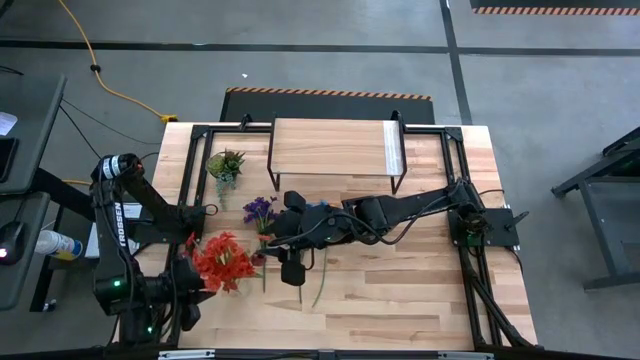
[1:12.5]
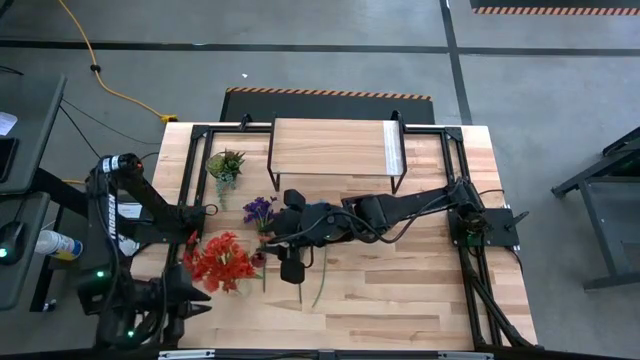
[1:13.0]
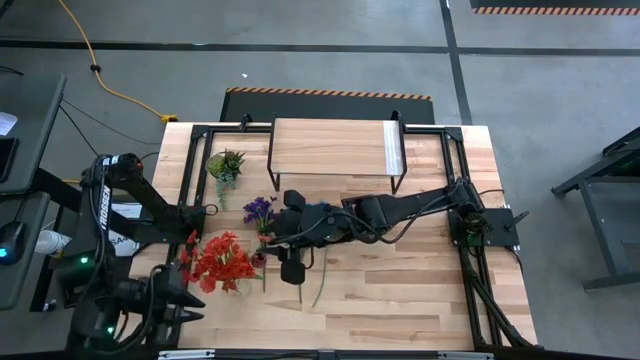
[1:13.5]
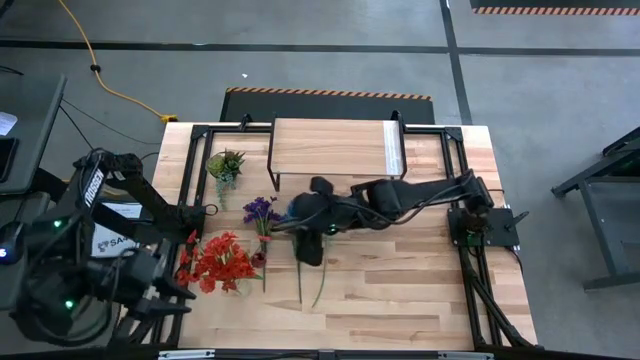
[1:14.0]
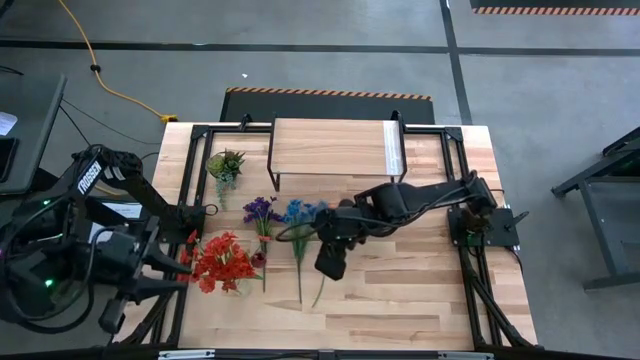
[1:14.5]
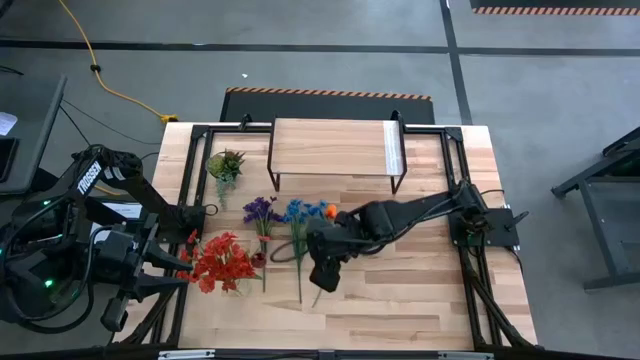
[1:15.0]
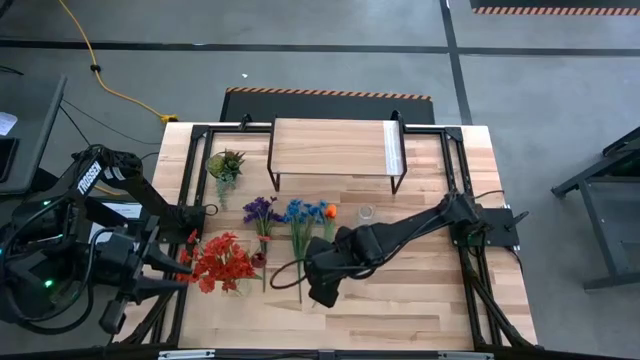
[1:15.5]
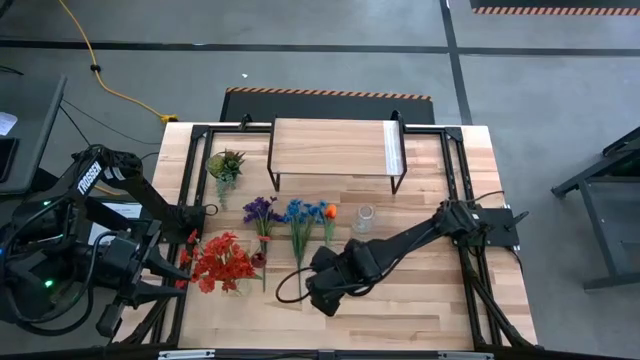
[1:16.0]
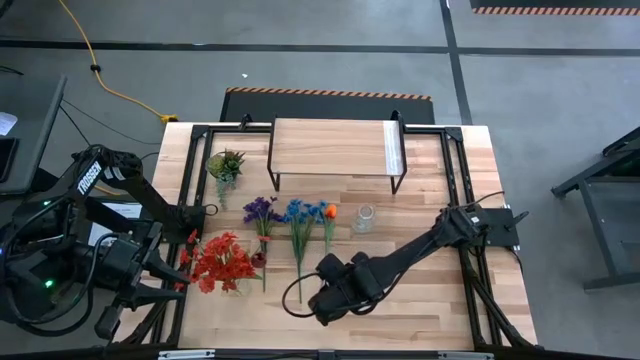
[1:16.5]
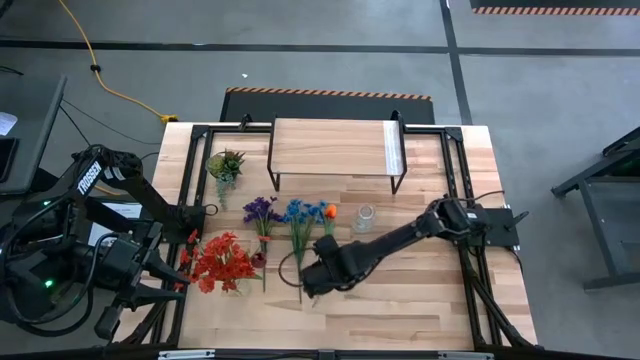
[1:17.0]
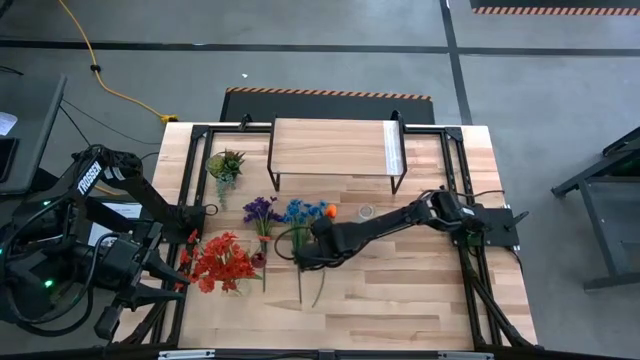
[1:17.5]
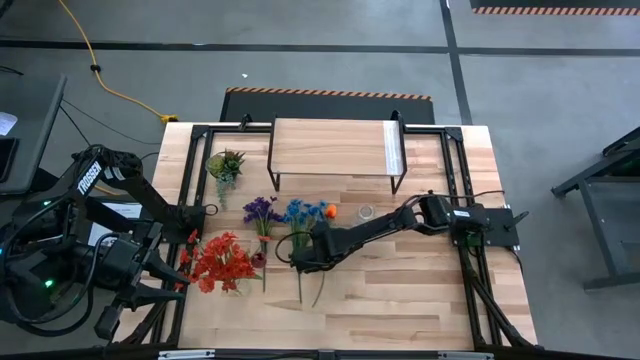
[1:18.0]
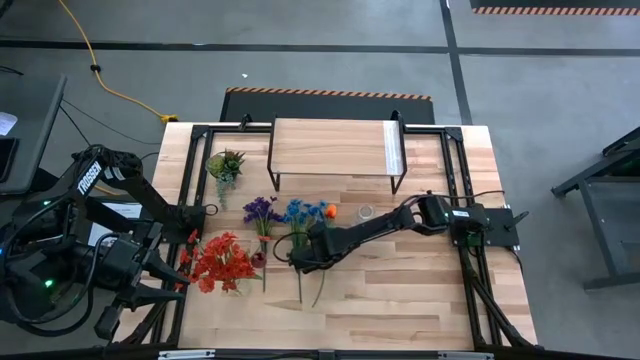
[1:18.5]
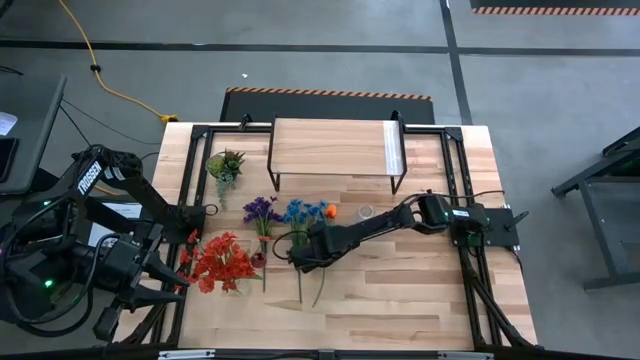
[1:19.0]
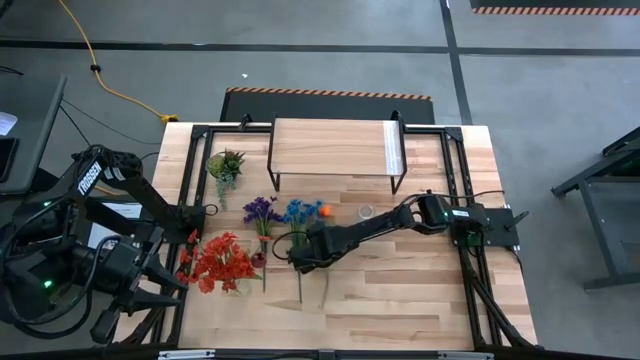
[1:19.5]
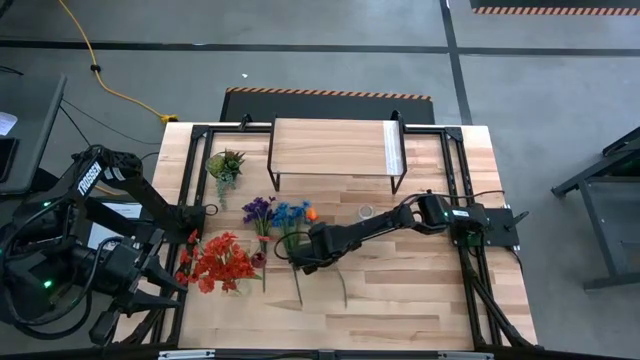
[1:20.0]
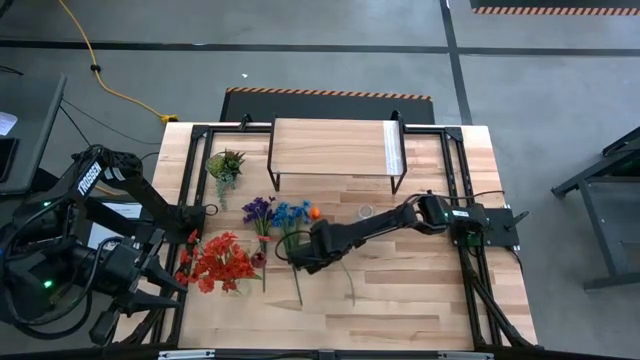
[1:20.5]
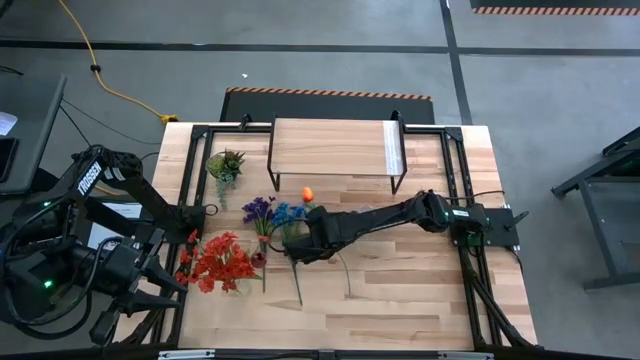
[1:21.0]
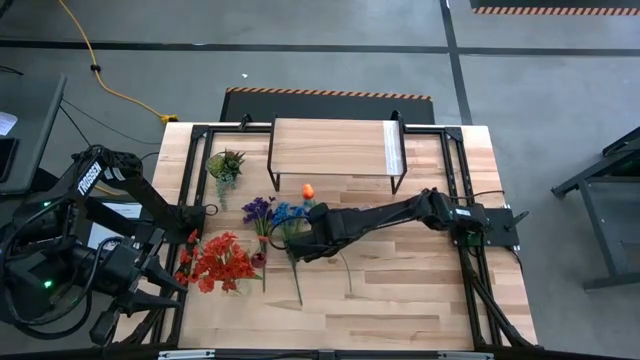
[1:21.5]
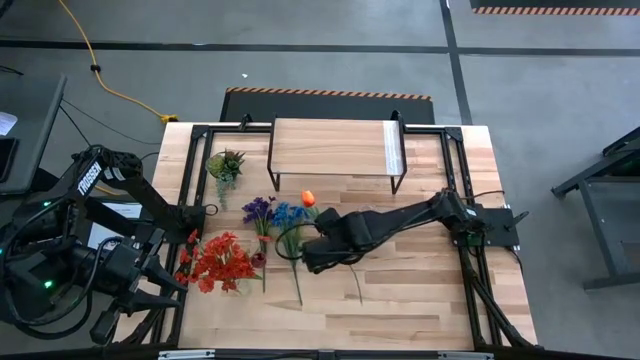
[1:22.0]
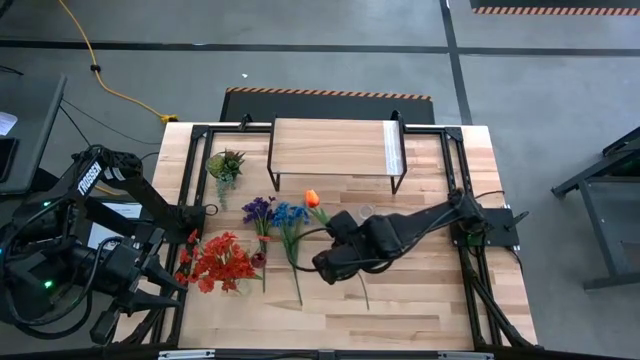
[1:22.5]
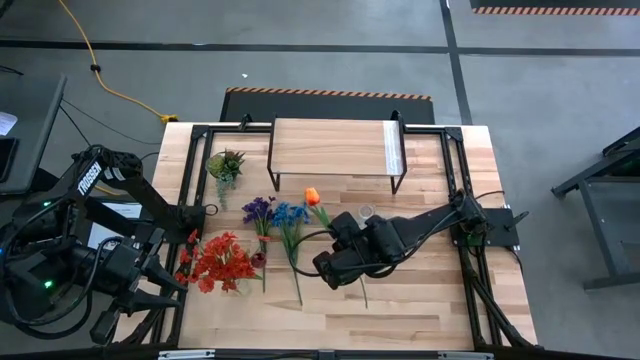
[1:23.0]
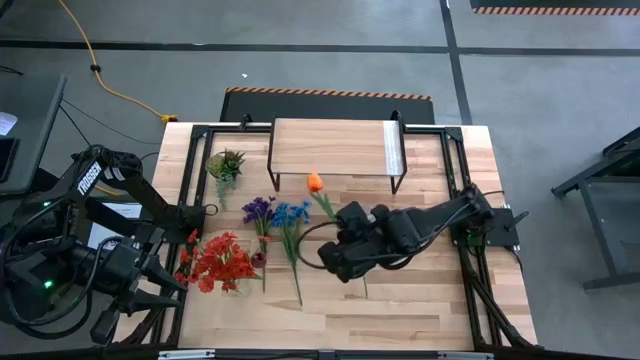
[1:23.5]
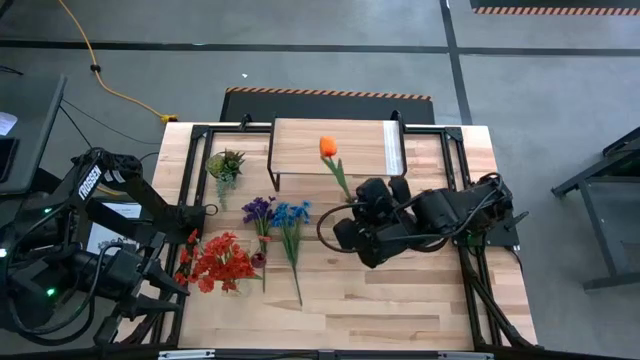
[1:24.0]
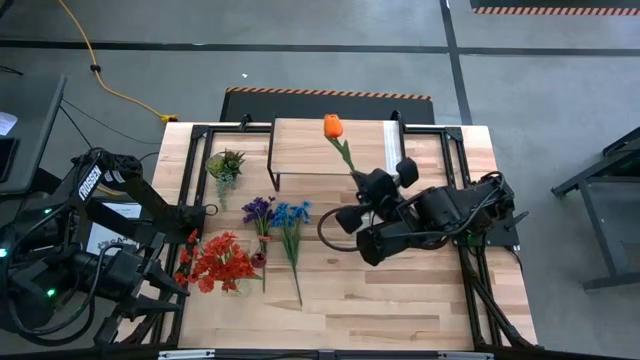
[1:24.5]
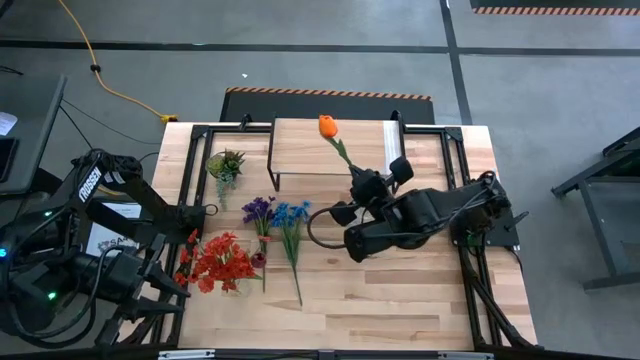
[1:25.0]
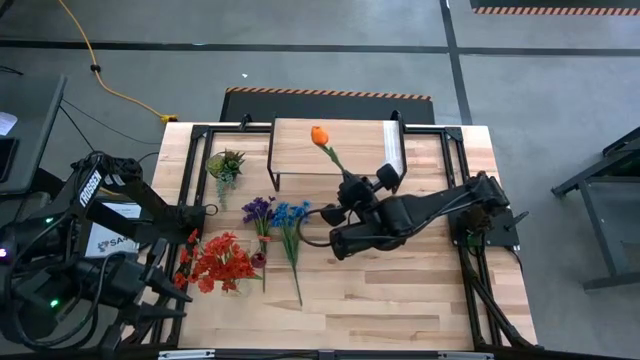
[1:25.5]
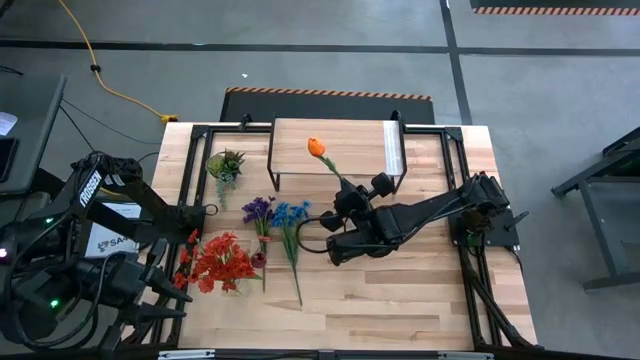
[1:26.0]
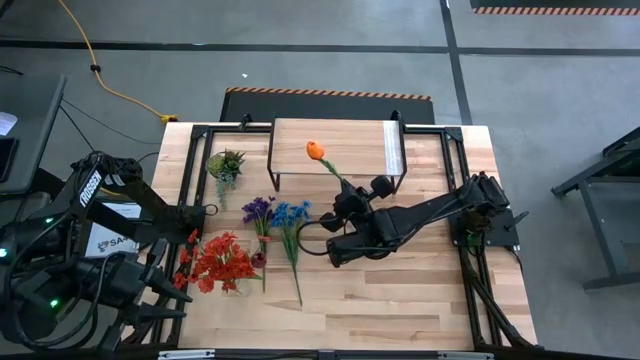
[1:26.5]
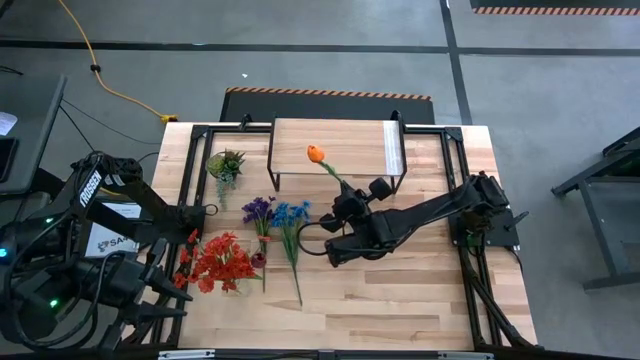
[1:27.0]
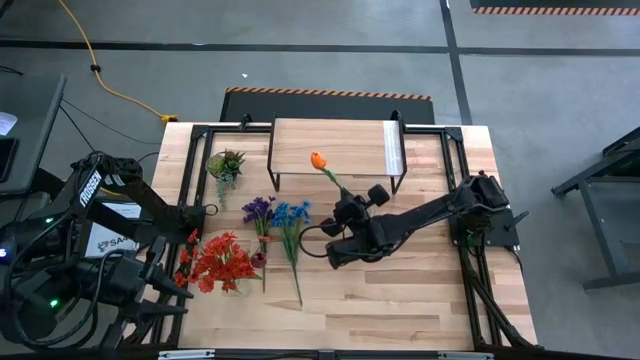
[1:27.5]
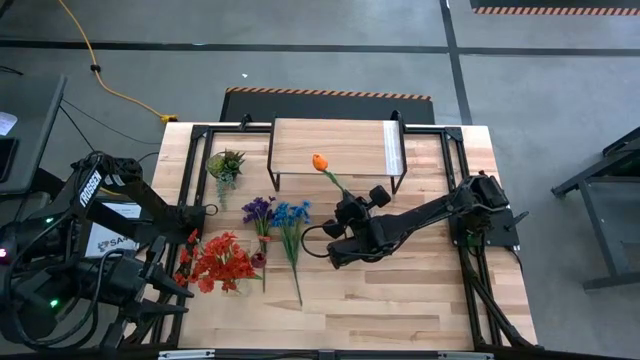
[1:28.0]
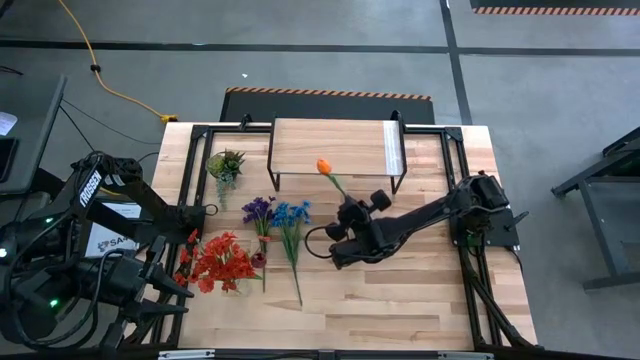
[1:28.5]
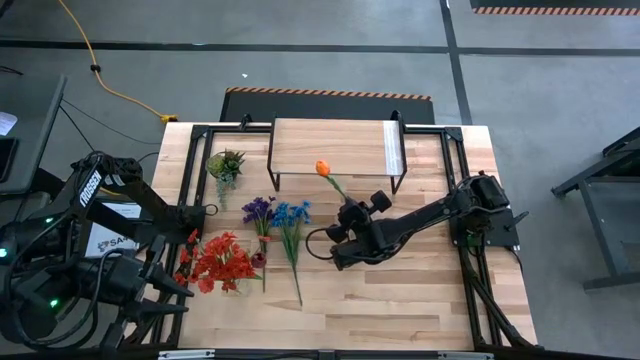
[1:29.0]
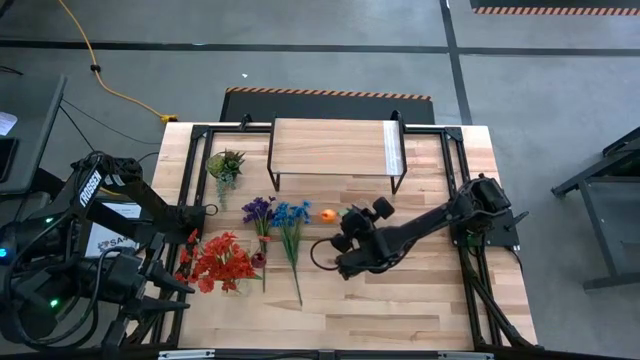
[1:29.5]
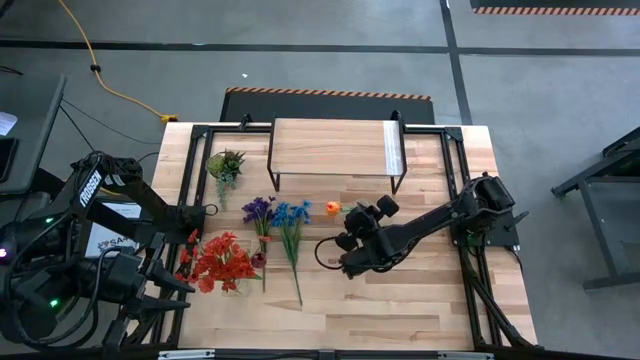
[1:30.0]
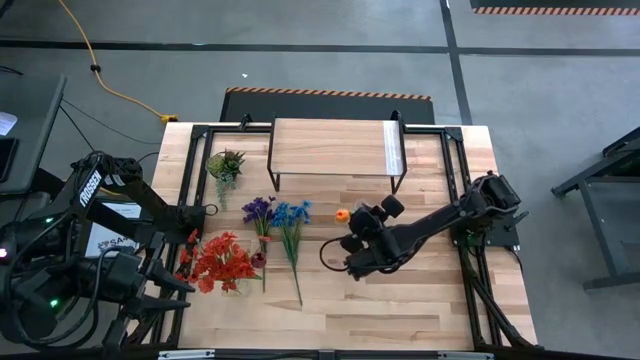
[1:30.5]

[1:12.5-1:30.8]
Task: Pick and place flowers into a vace then onto a shelf
Put the orange flower into the right transparent vase

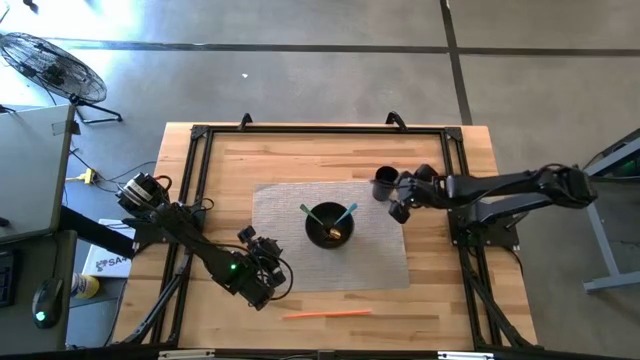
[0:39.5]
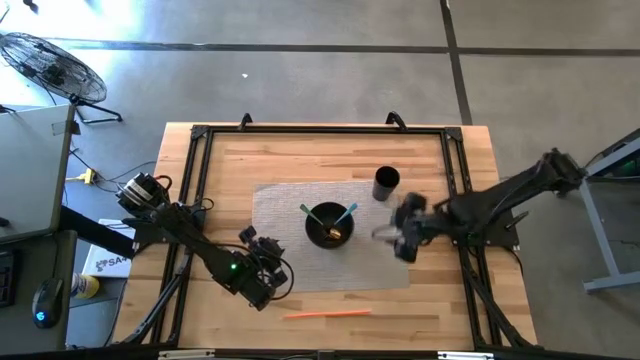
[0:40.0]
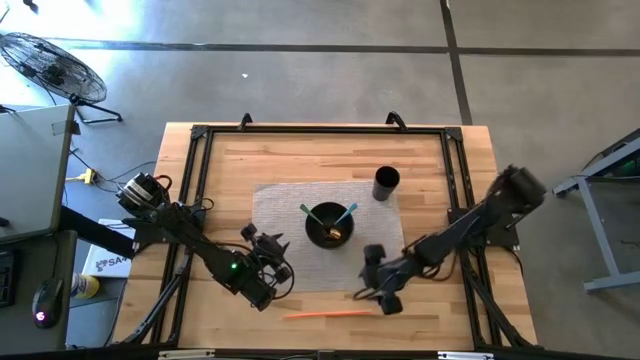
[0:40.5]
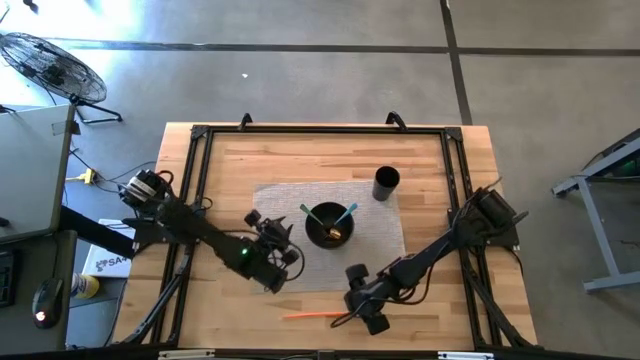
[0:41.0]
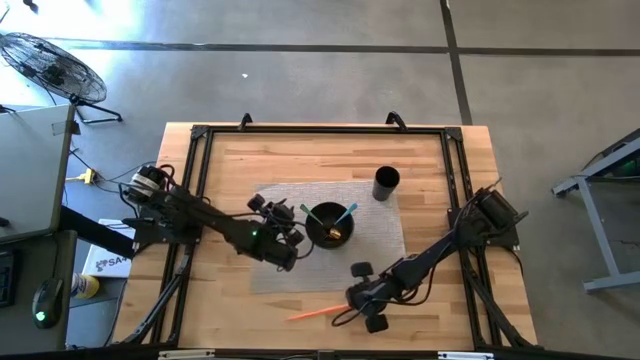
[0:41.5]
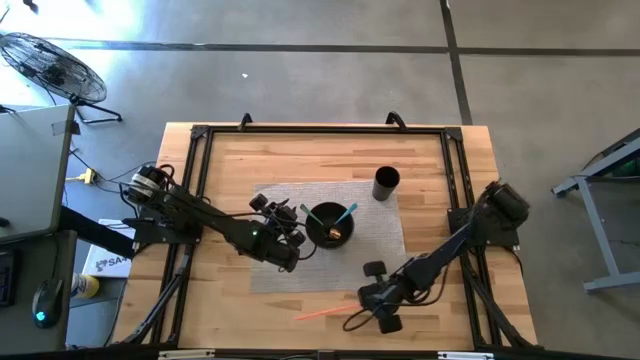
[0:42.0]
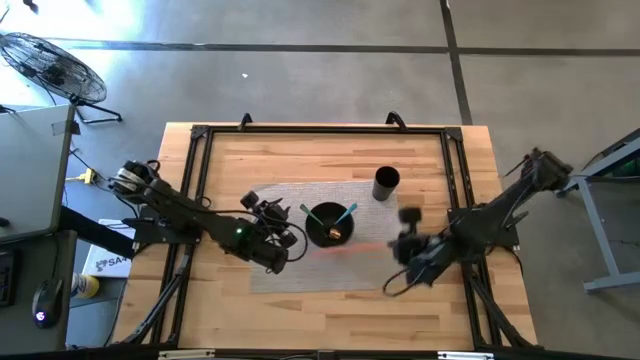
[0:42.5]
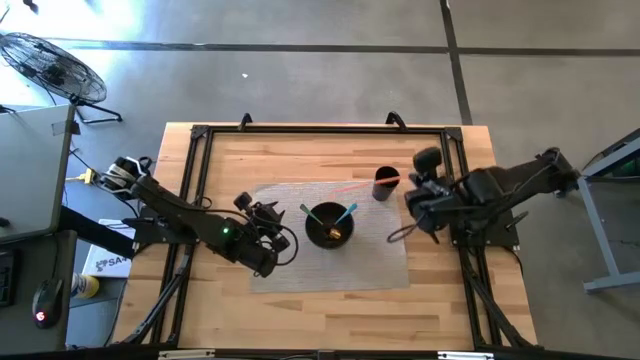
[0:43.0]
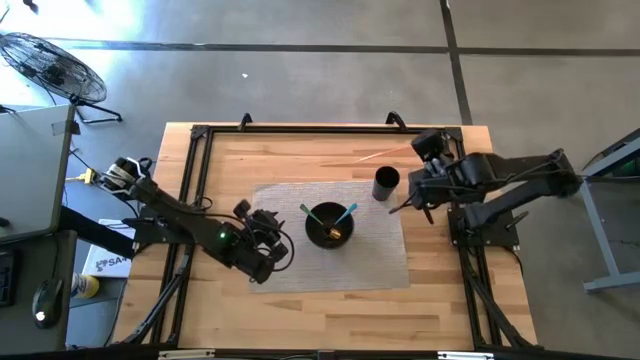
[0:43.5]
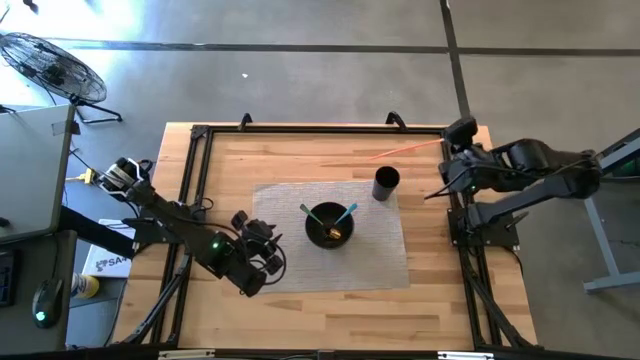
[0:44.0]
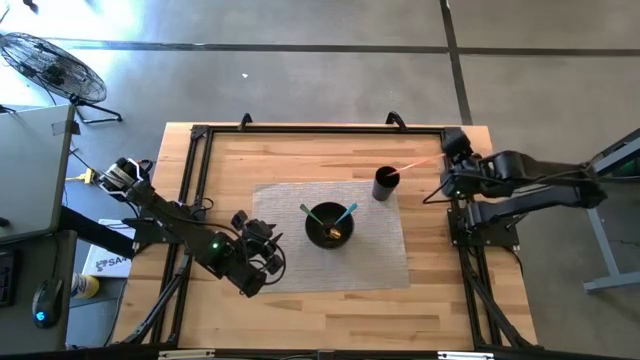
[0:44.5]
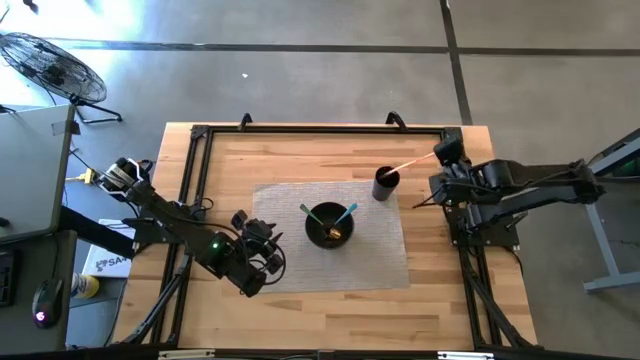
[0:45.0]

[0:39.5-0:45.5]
Task: Pick & Place Utensil
Put the orange straw into the black cup on the gray mat
